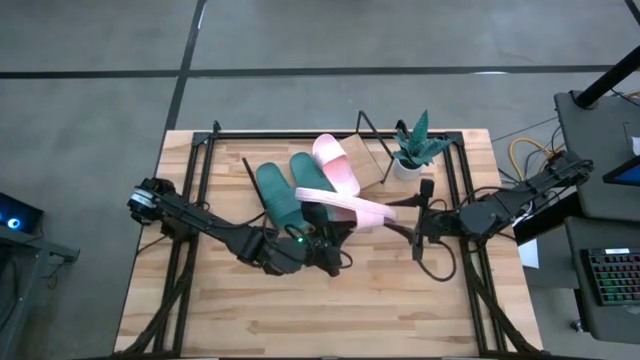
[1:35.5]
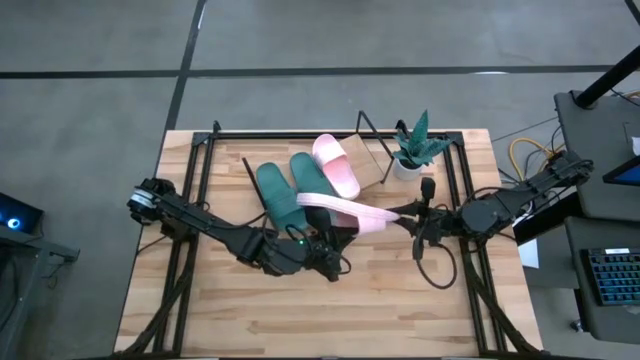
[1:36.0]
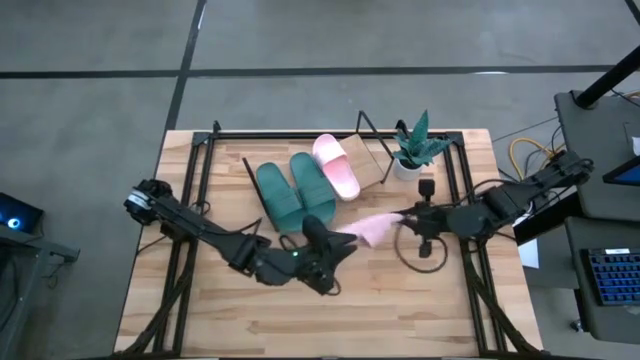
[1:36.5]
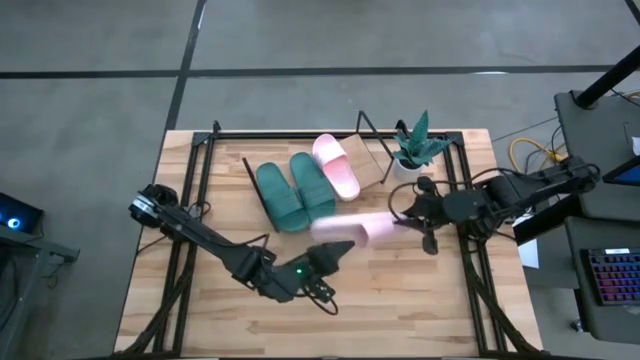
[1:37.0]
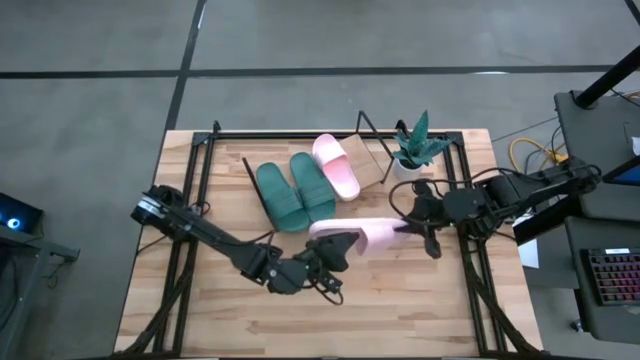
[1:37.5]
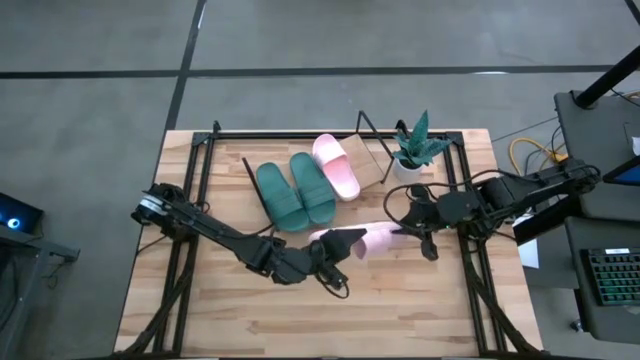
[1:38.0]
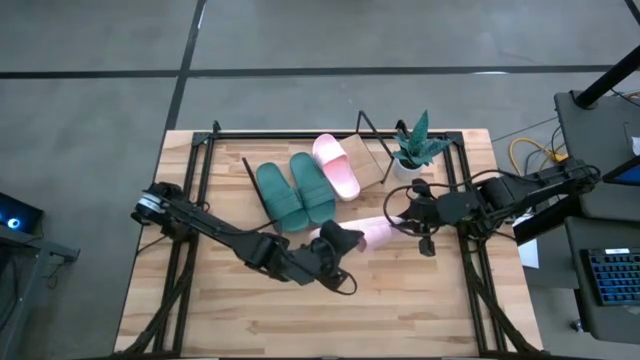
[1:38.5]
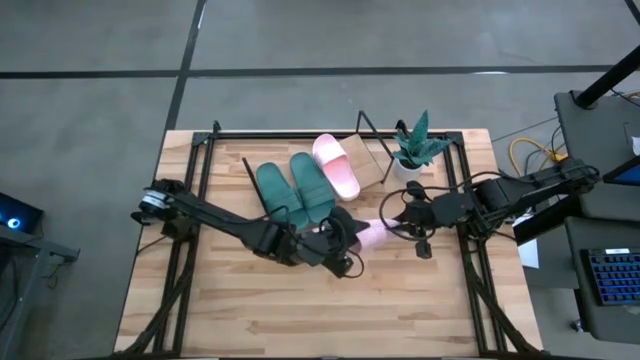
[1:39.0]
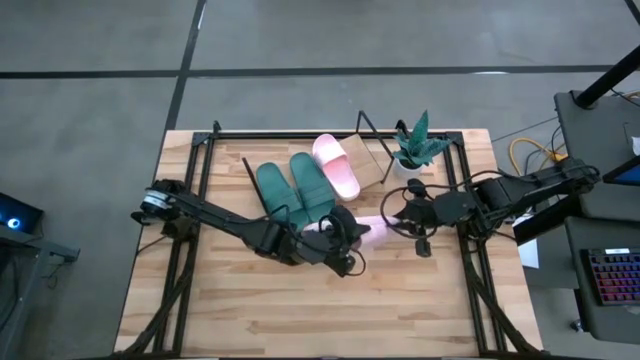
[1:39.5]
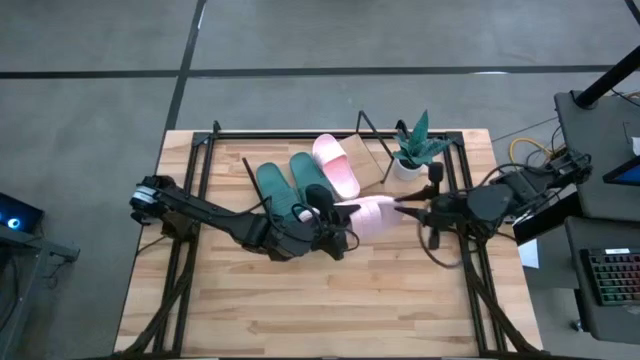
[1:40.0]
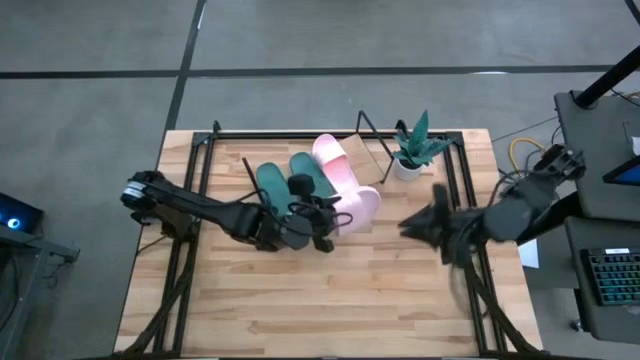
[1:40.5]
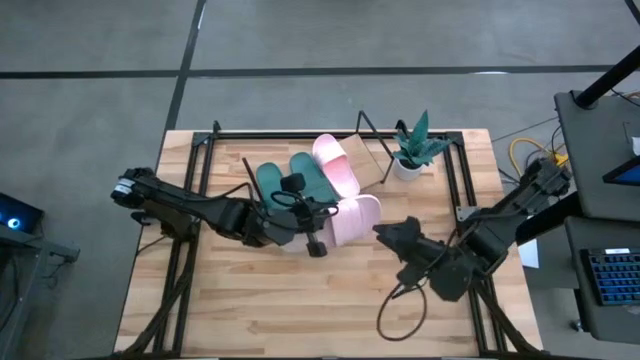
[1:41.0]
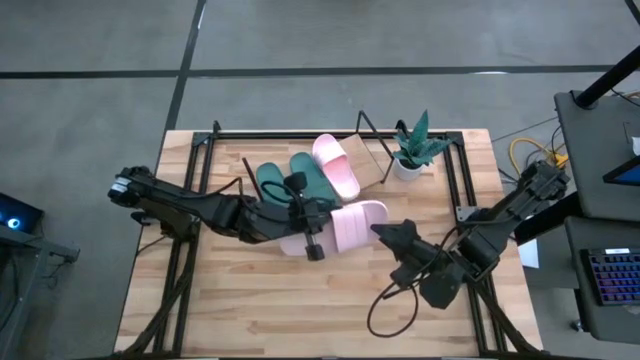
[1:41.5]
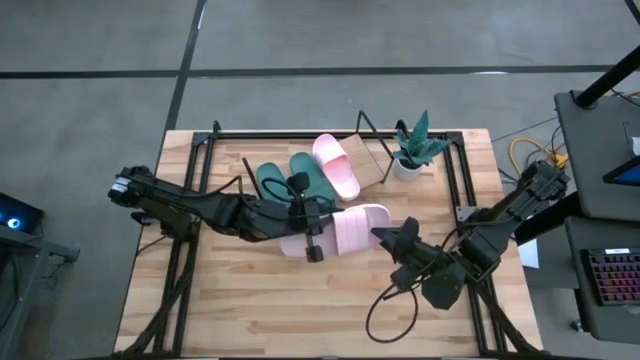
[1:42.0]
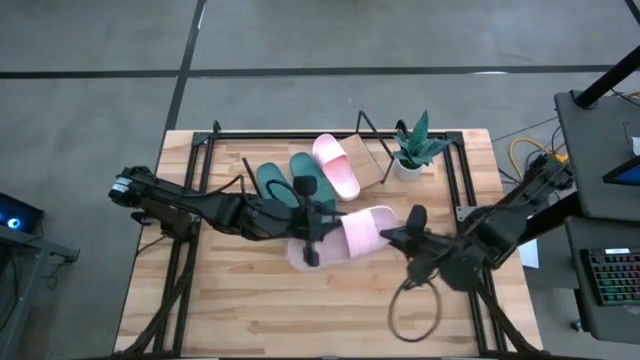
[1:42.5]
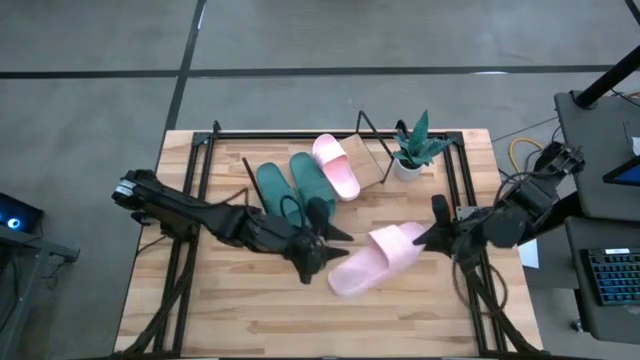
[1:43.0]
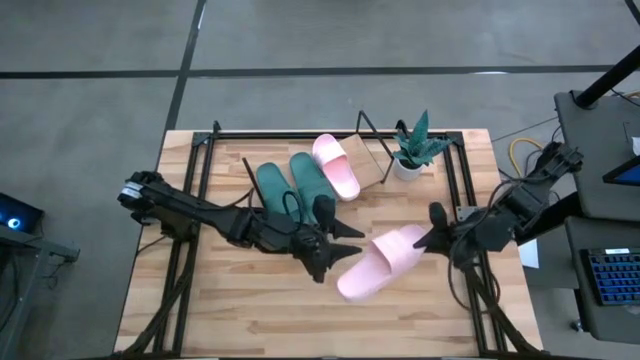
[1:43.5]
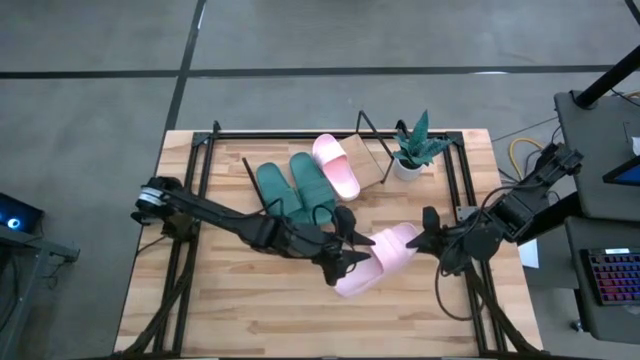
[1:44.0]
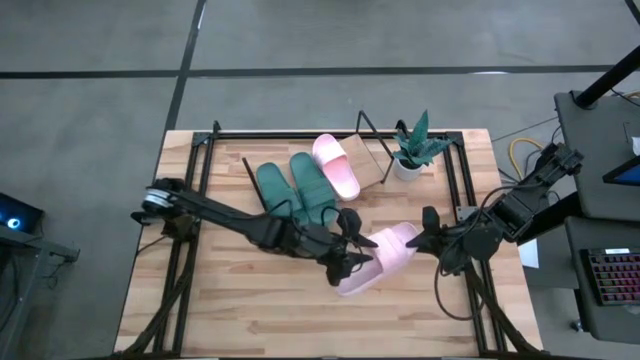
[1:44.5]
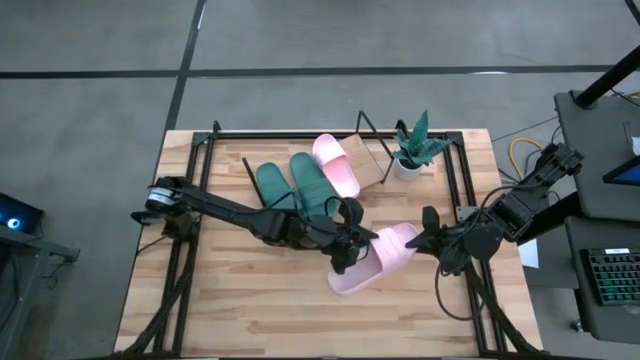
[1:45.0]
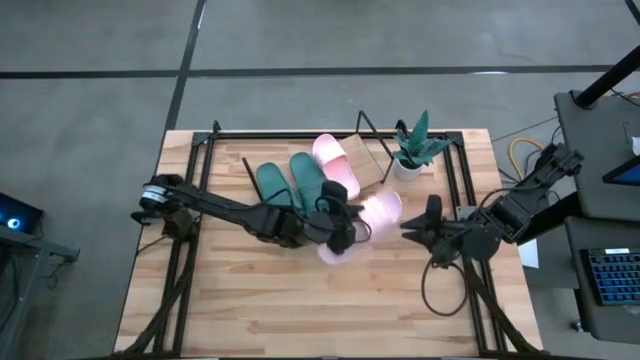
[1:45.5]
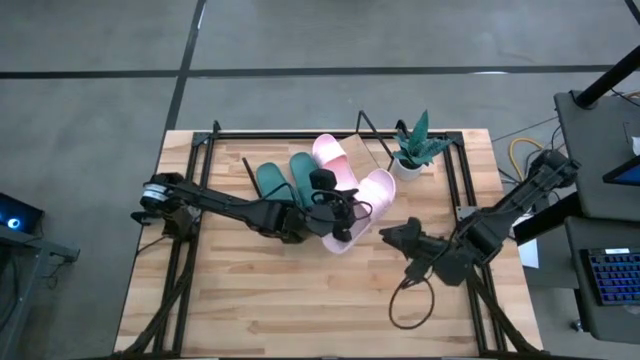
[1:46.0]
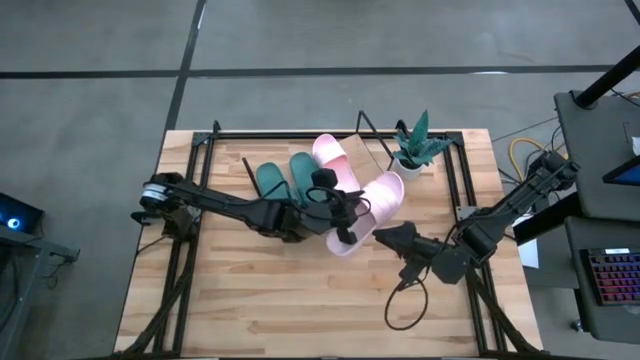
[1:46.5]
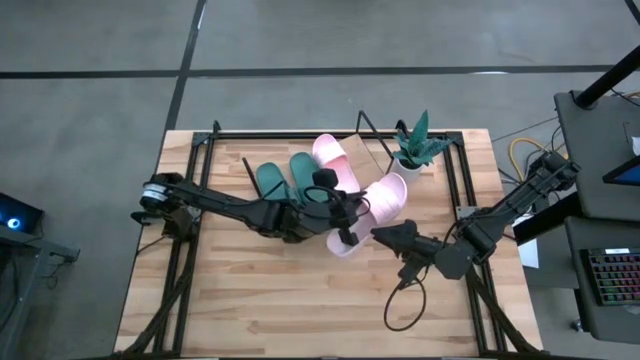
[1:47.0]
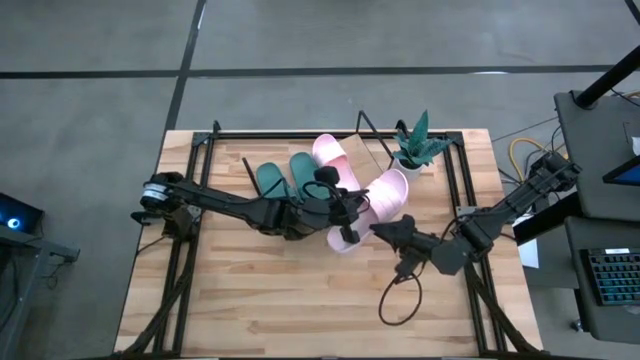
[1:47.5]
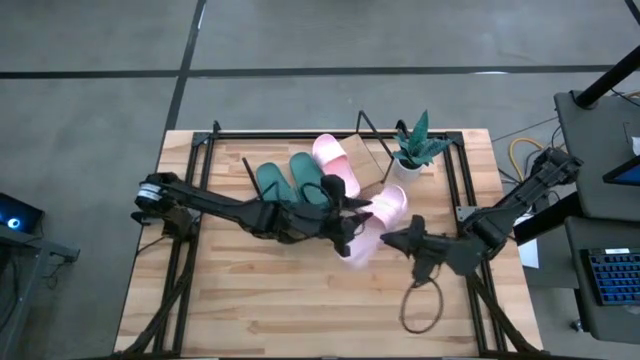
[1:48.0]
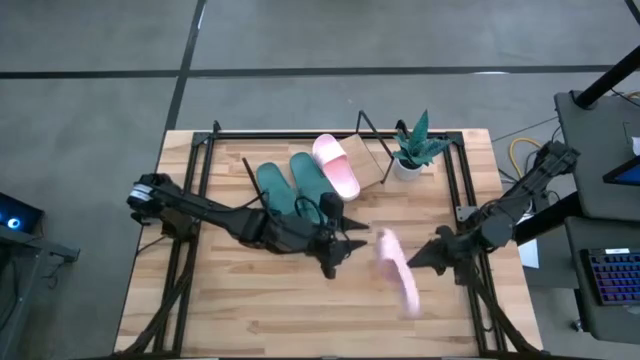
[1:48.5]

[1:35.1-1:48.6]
Task: Pick and place slides into the shelf
Put the pink slide on the shelf

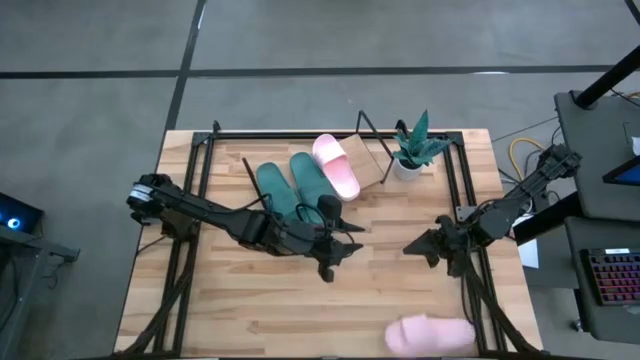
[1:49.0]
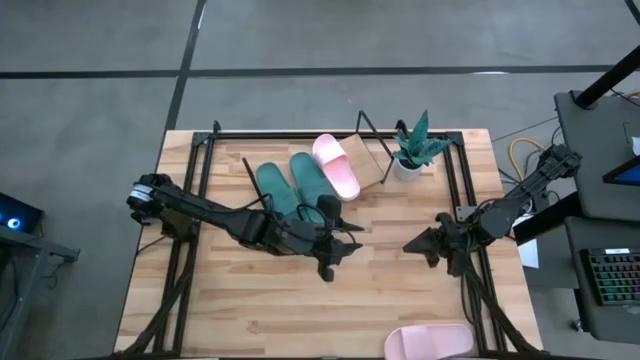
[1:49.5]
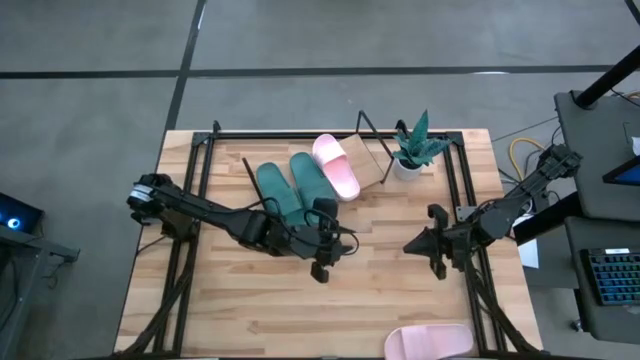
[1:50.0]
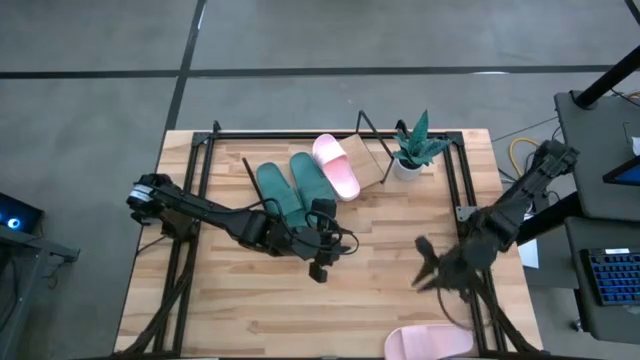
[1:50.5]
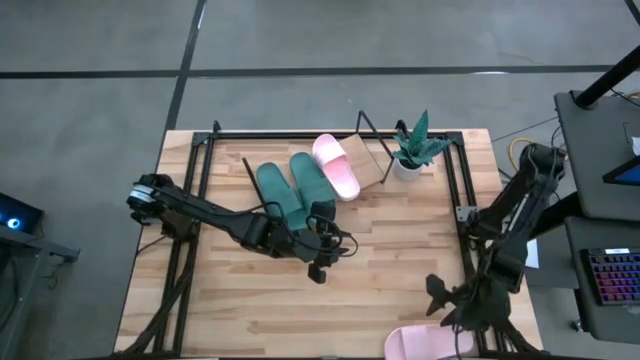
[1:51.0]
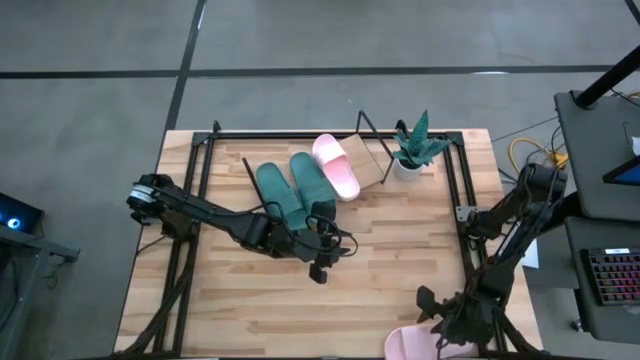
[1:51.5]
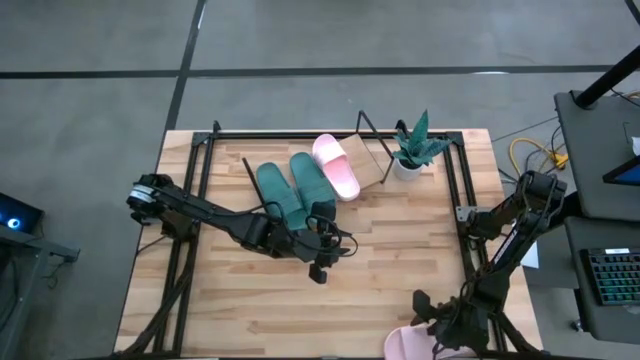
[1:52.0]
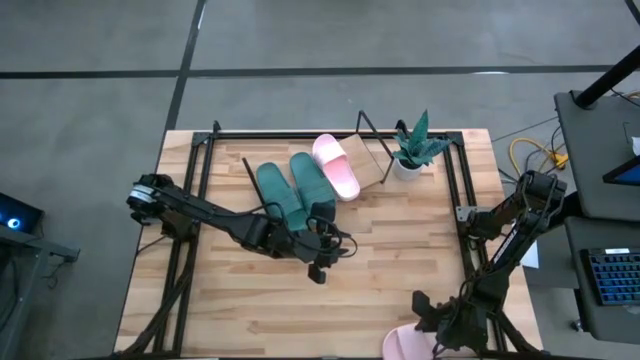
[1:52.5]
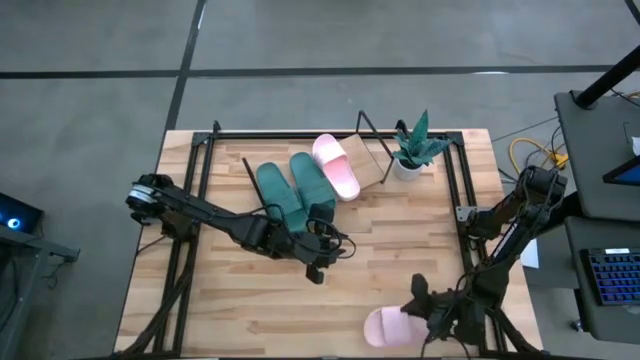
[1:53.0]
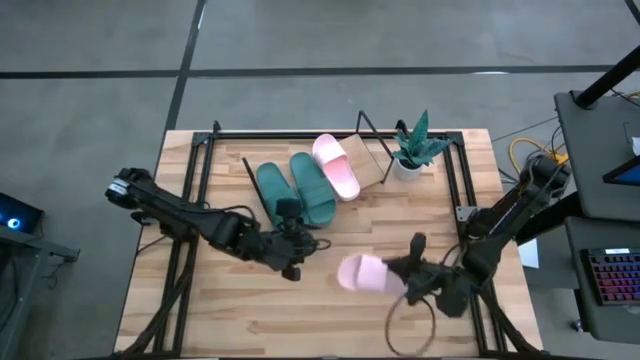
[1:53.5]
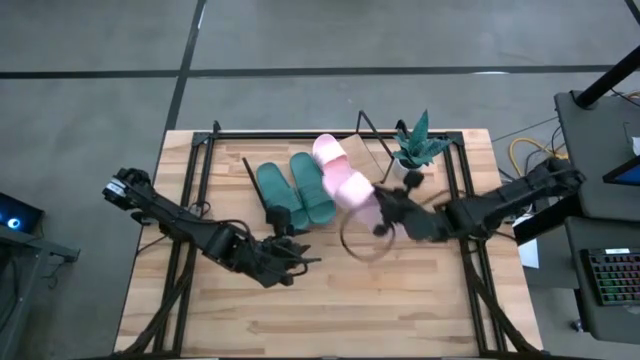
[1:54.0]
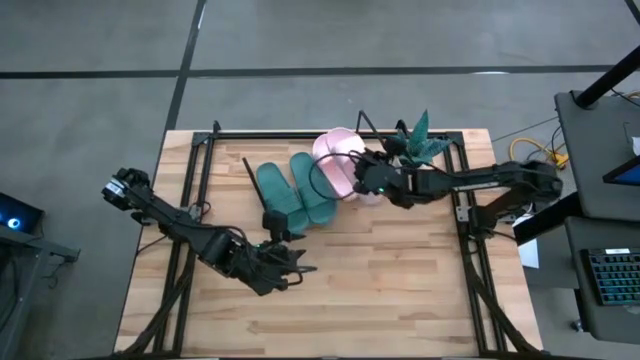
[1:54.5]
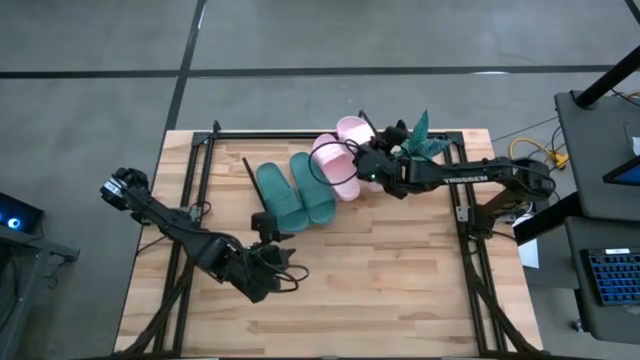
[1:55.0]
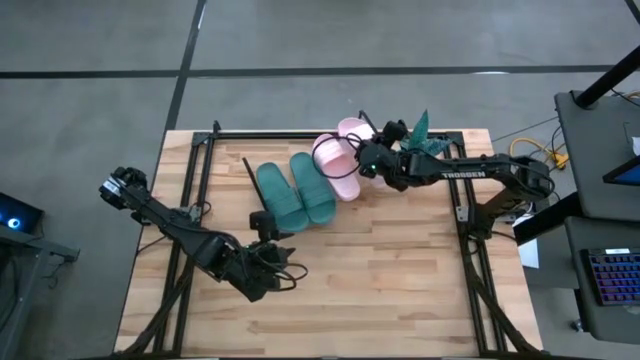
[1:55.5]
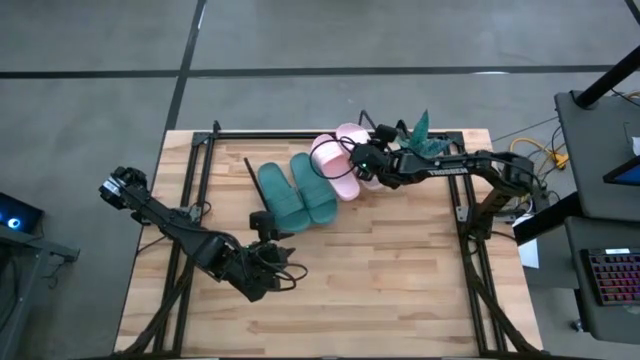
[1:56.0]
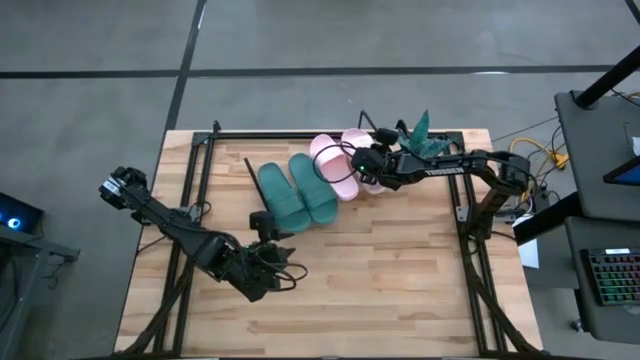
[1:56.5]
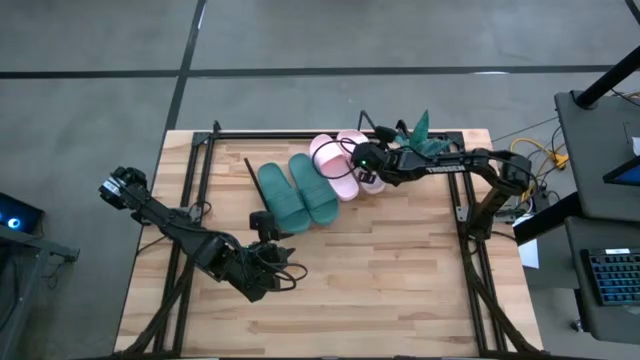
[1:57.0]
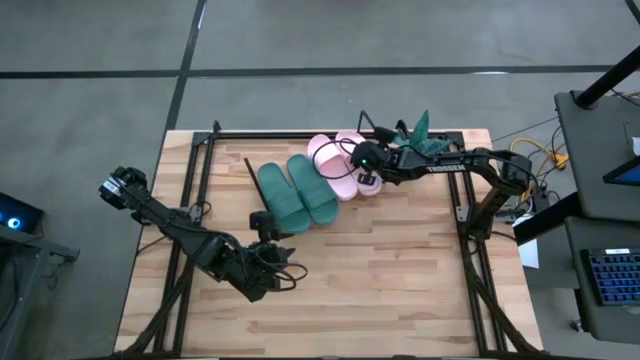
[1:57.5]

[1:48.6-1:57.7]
Put the pink slide on the shelf
